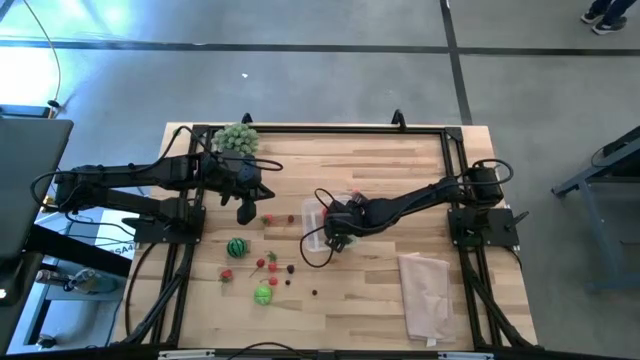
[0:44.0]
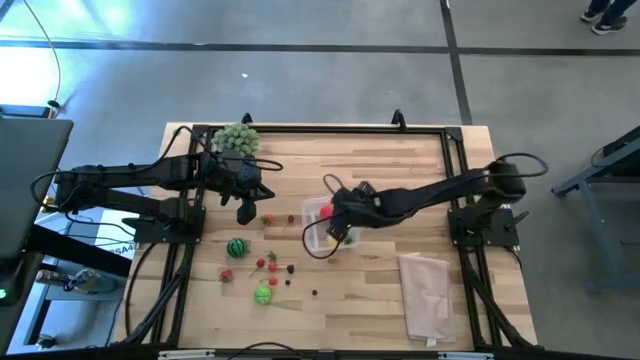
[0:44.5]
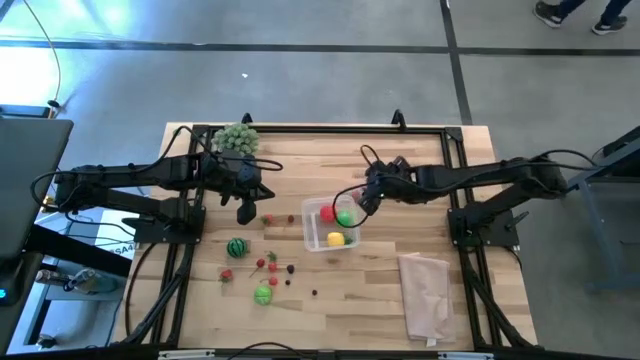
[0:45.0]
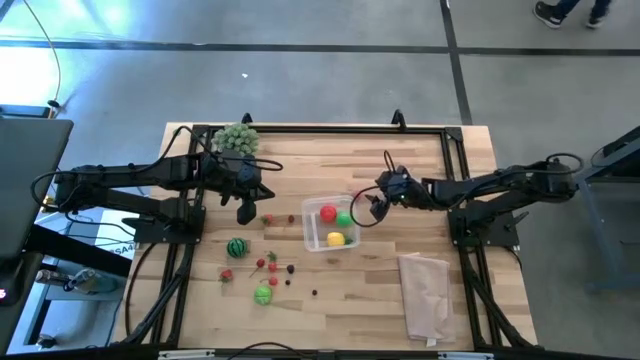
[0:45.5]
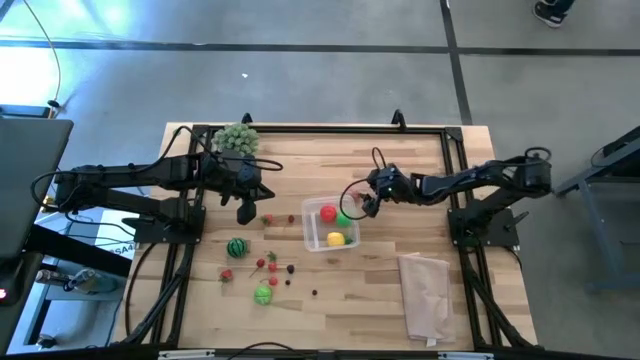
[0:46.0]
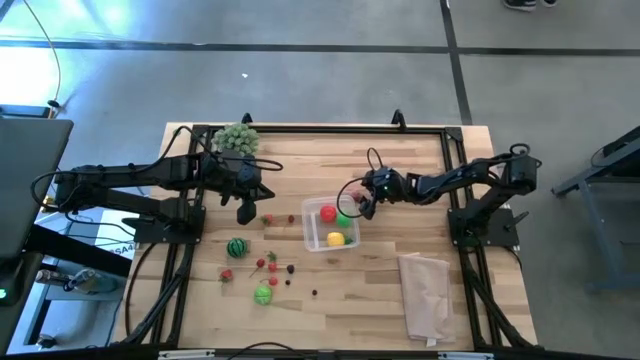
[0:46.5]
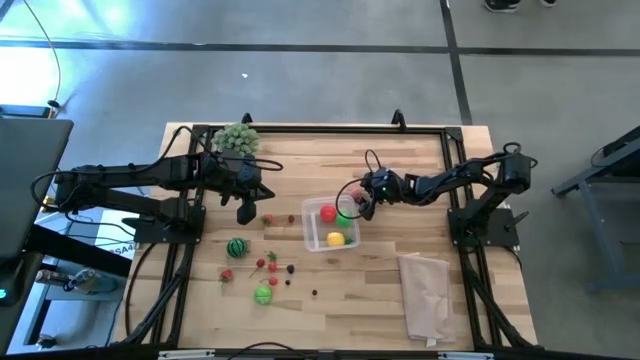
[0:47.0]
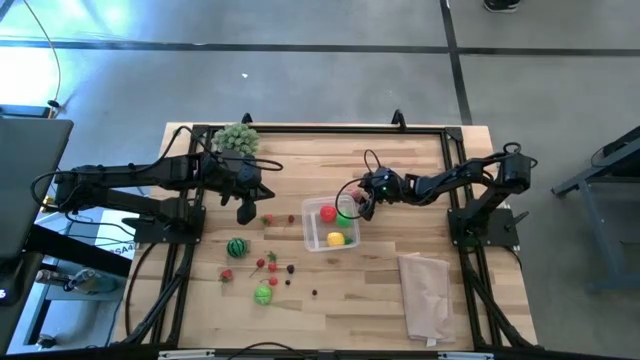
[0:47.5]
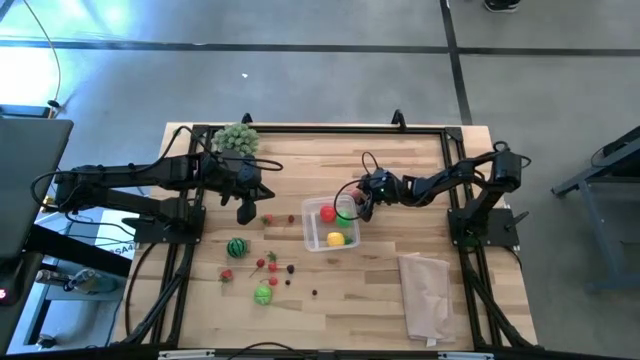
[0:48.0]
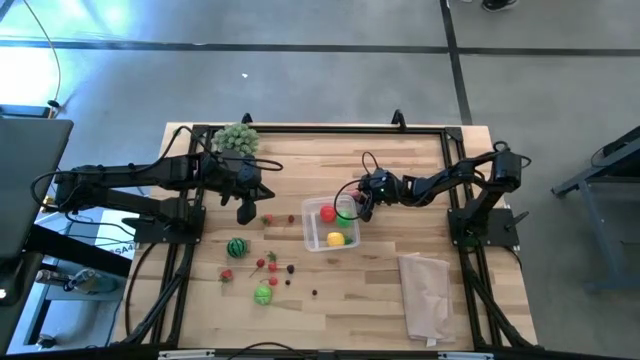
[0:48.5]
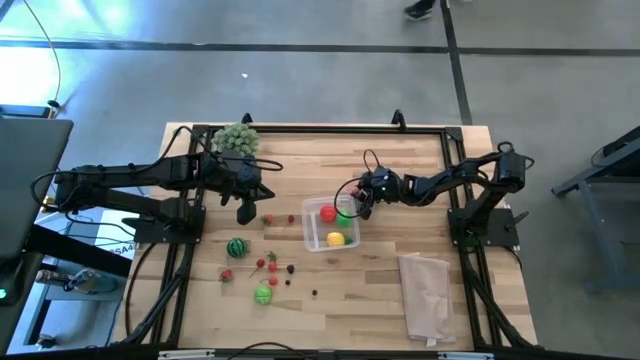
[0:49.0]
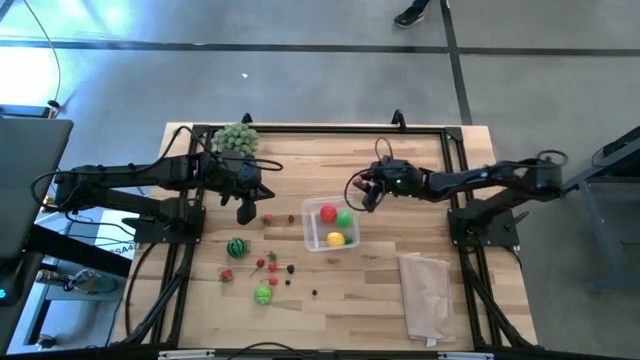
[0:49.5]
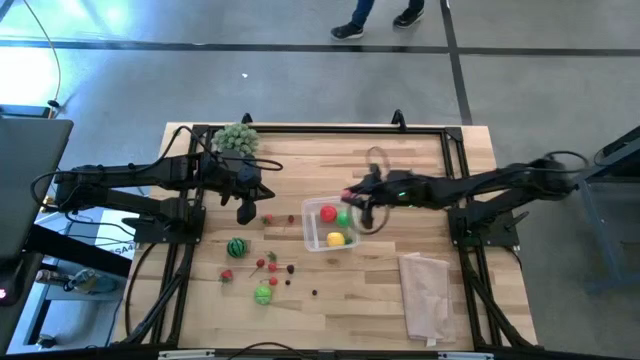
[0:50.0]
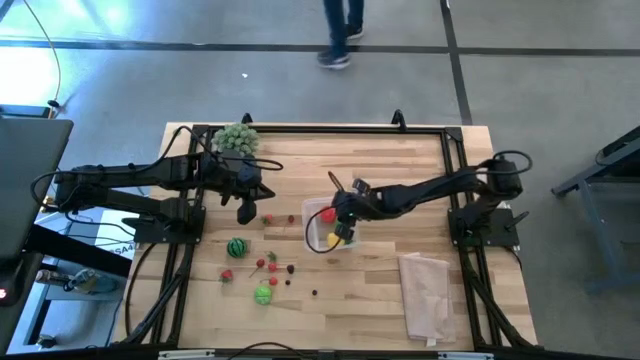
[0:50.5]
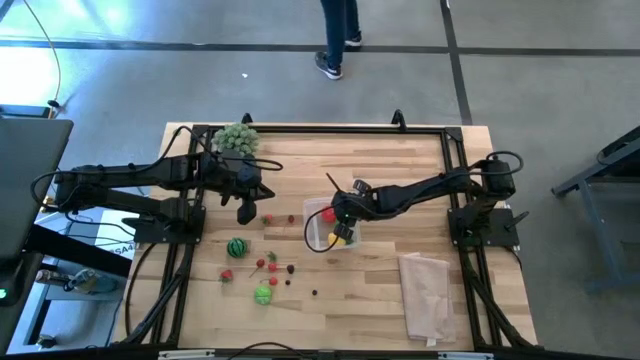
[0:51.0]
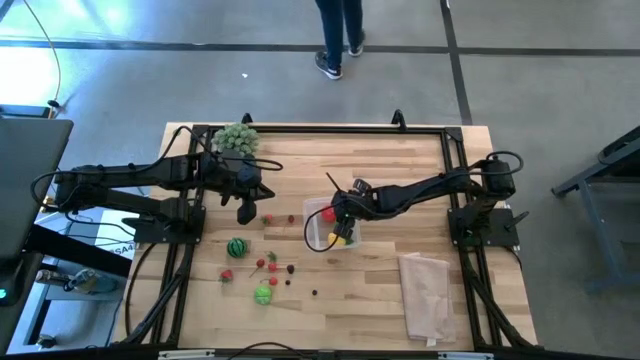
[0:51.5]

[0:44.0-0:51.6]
Task: Pick and placing Produce into tupperware
Put the pink peach into the transparent bin

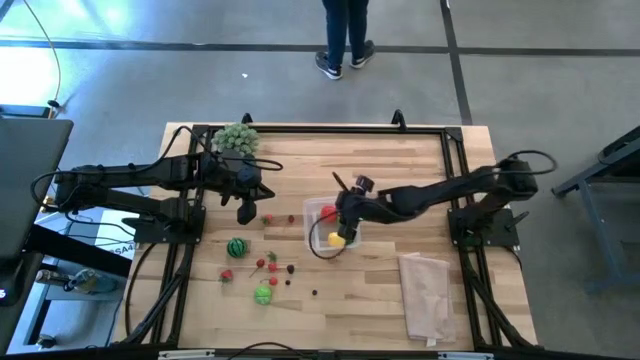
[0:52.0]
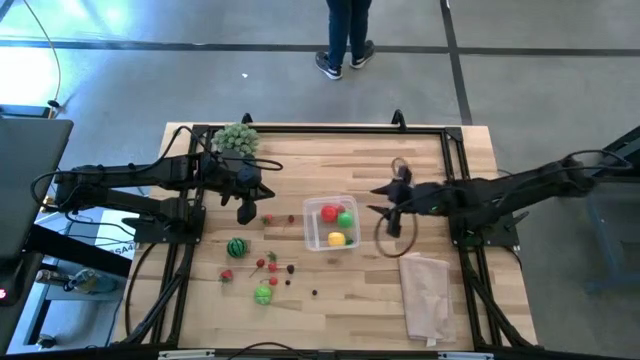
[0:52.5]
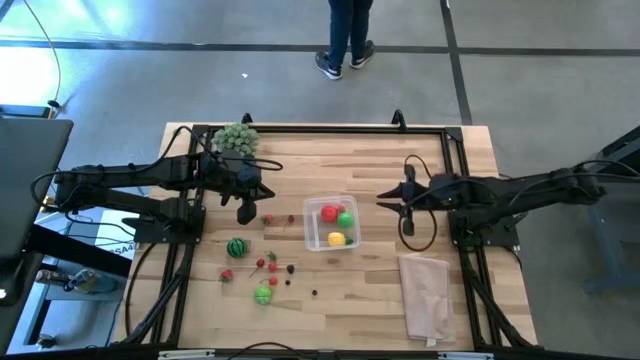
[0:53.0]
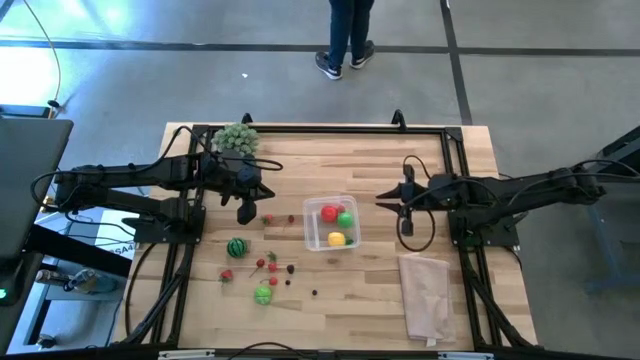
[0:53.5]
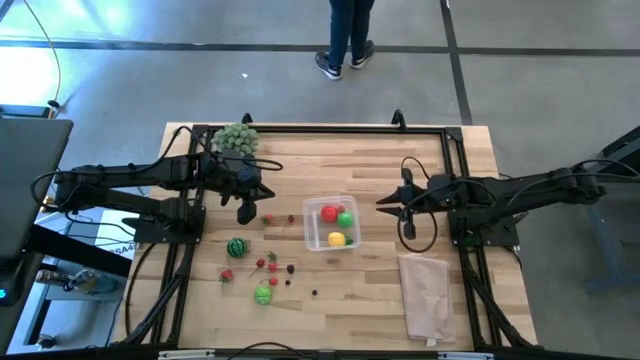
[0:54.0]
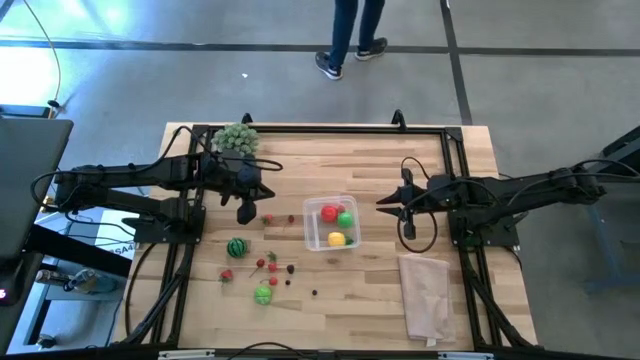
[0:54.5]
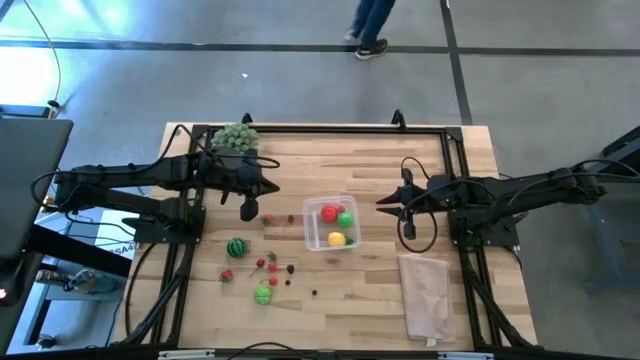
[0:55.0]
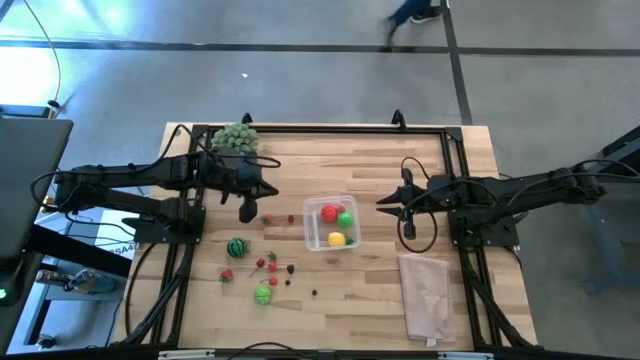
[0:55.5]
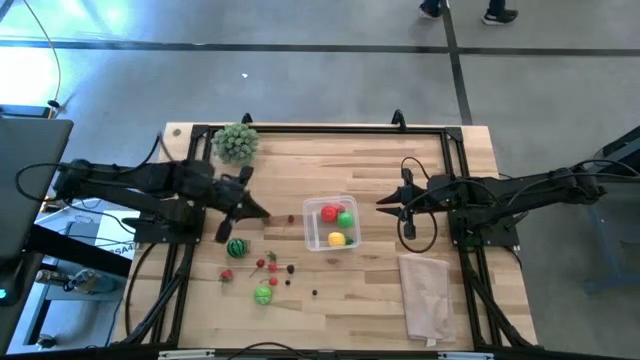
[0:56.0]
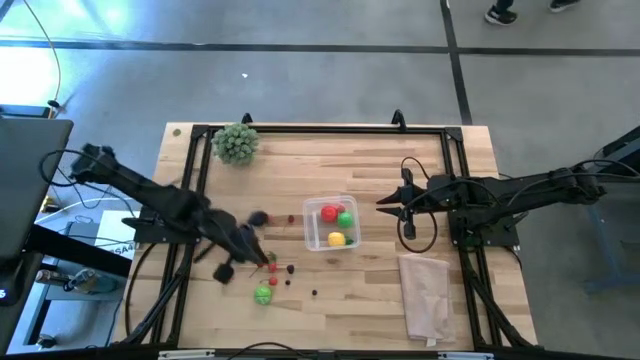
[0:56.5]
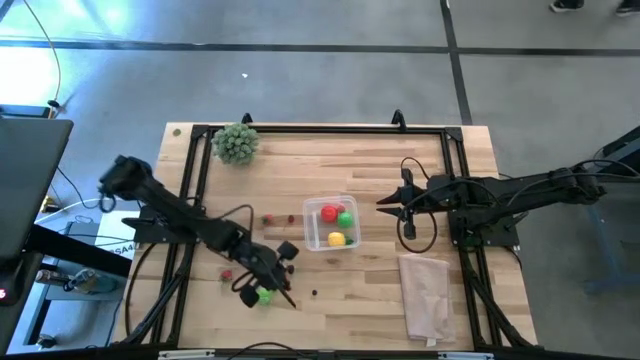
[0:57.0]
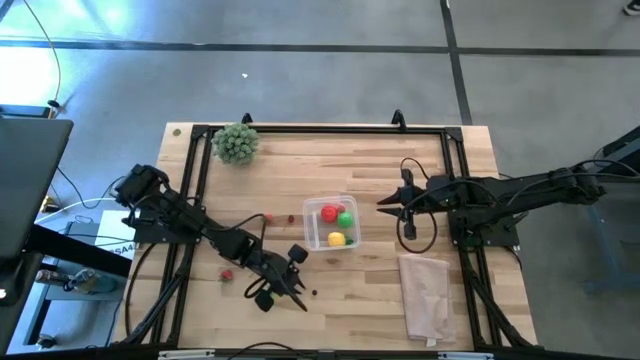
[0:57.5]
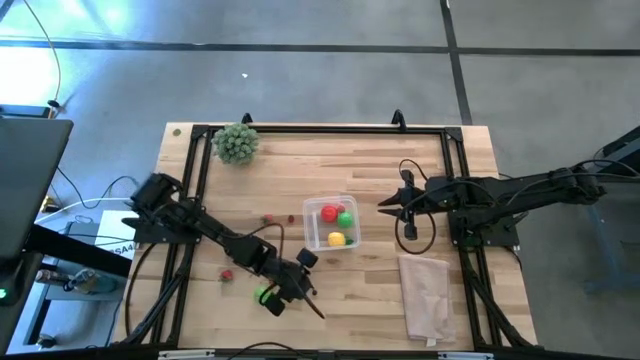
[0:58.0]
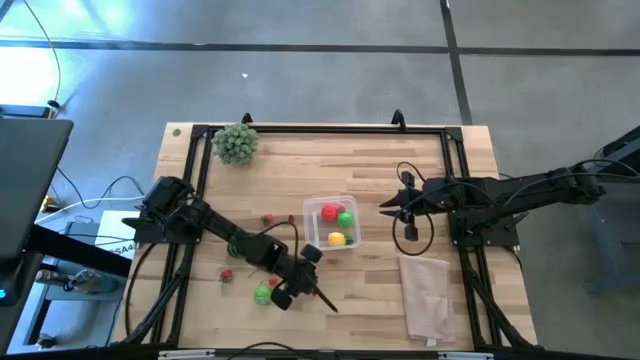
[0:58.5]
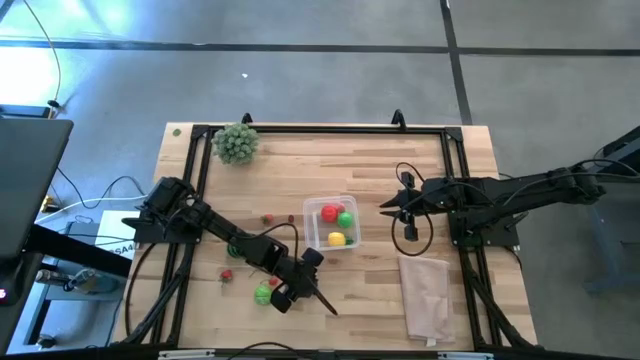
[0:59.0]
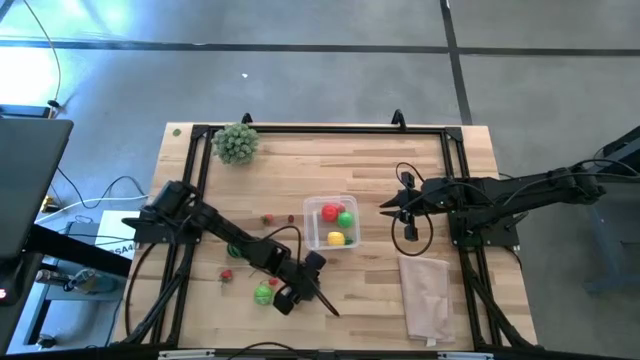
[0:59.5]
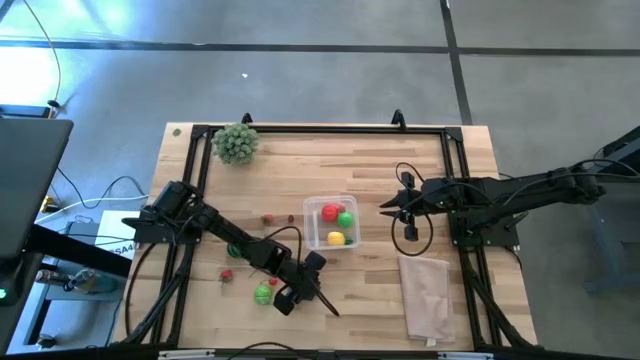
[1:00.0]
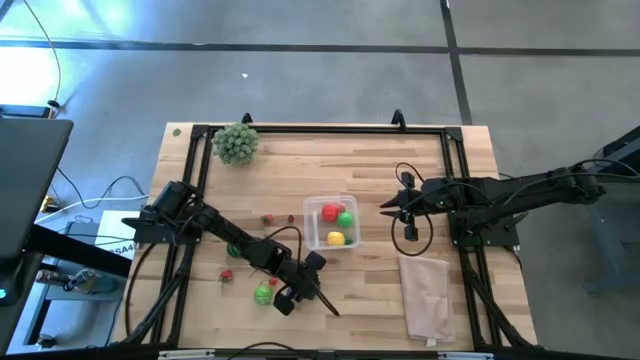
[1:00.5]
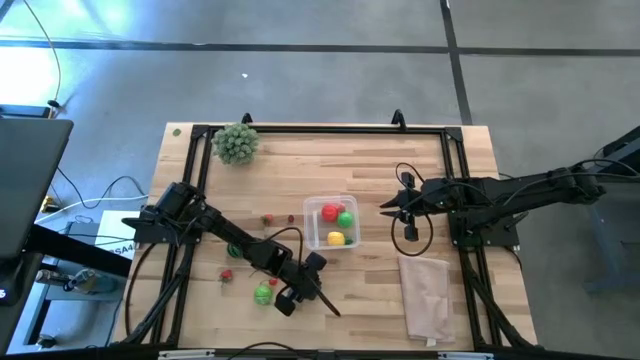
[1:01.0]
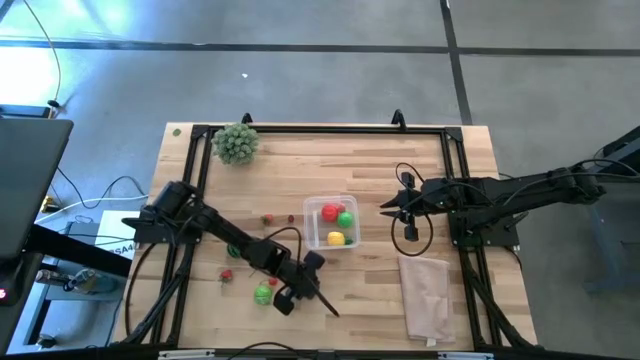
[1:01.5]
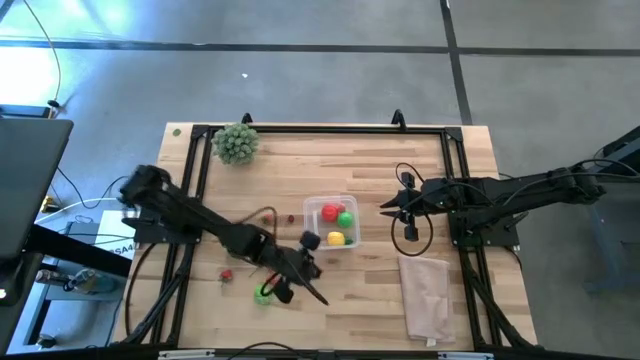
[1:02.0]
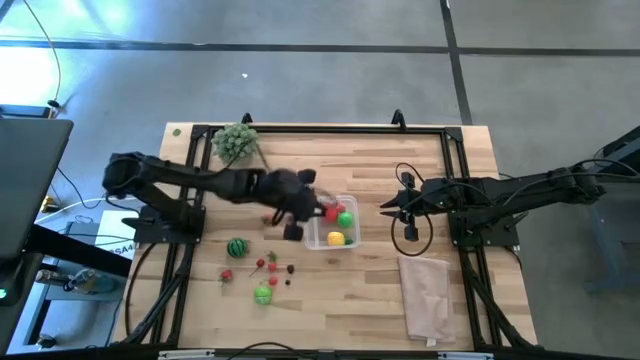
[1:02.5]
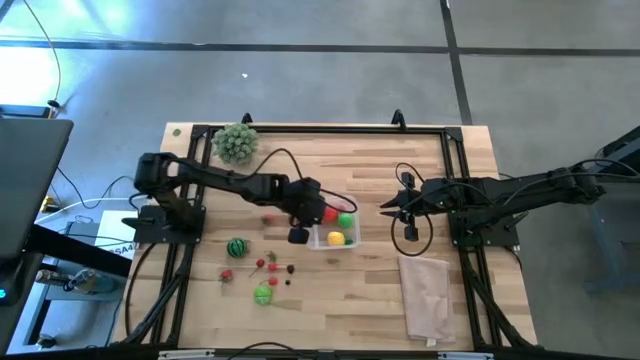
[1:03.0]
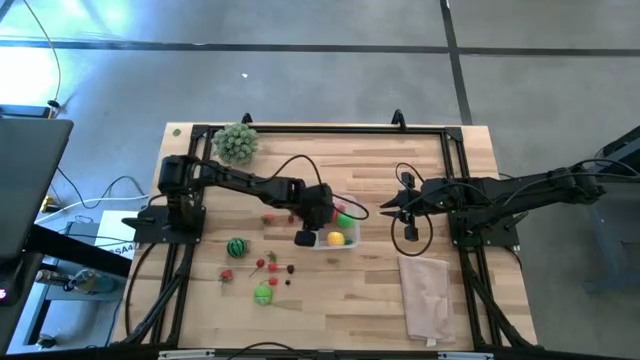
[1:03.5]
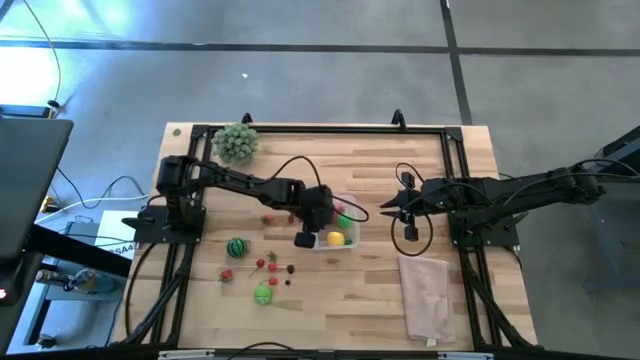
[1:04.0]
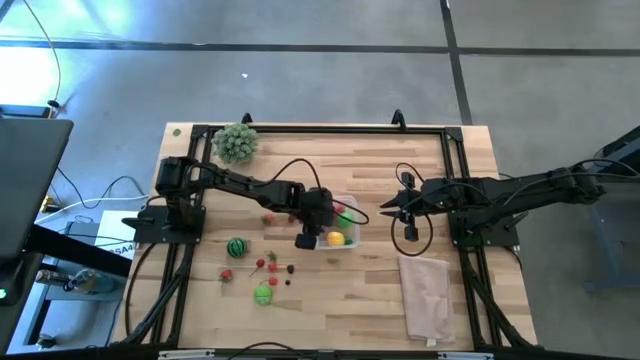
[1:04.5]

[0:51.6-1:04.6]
Put the bottom blueberry into the transparent bin

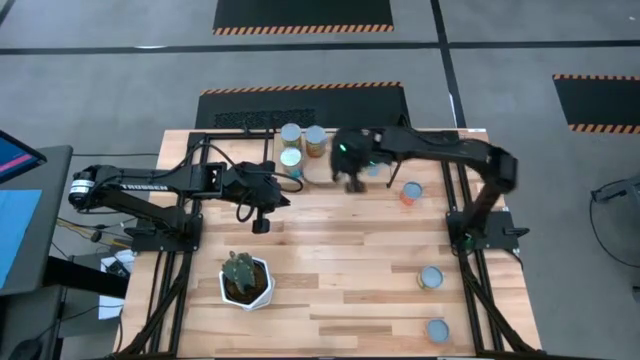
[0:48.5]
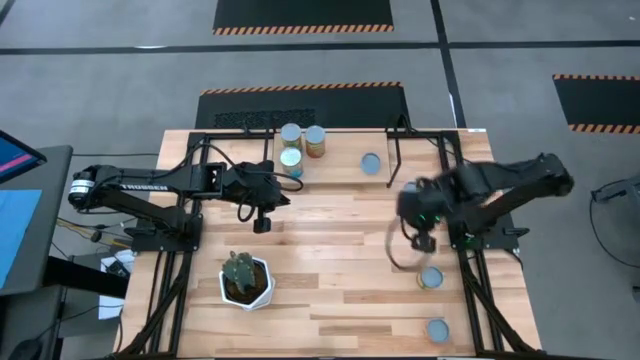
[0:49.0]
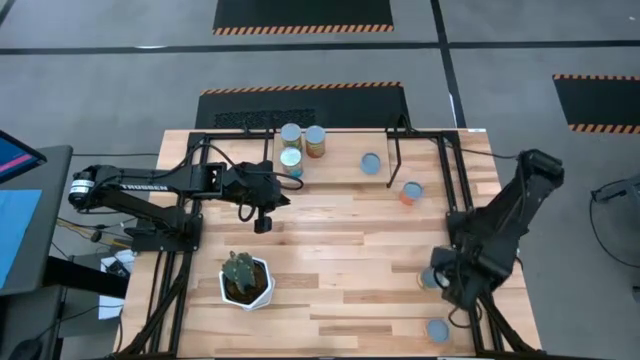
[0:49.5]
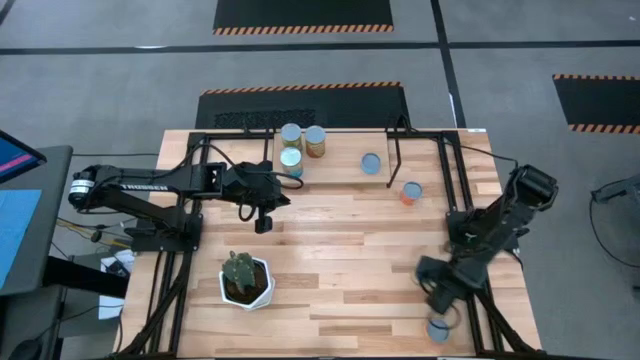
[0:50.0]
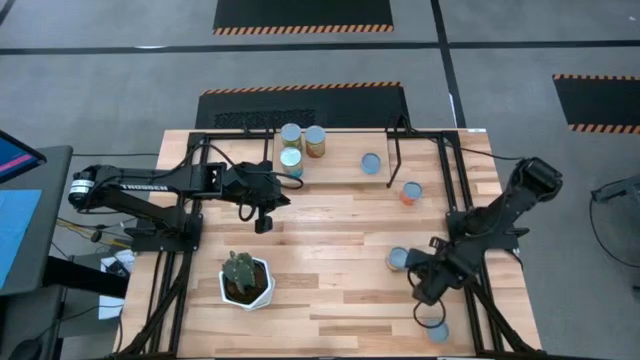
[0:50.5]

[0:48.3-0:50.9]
Task: Pick and place cans onto a shelf
Move the canned peaches to the middle of the table
